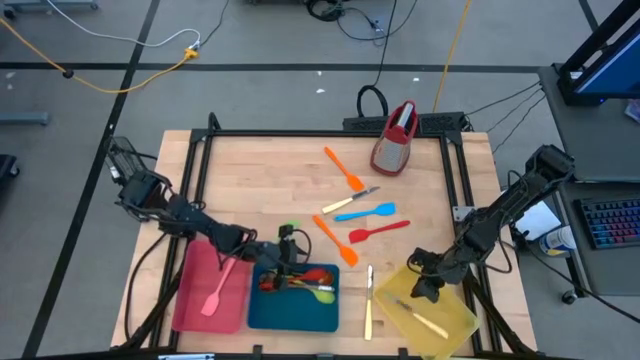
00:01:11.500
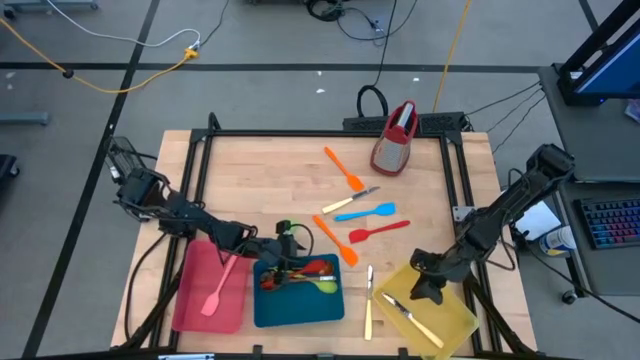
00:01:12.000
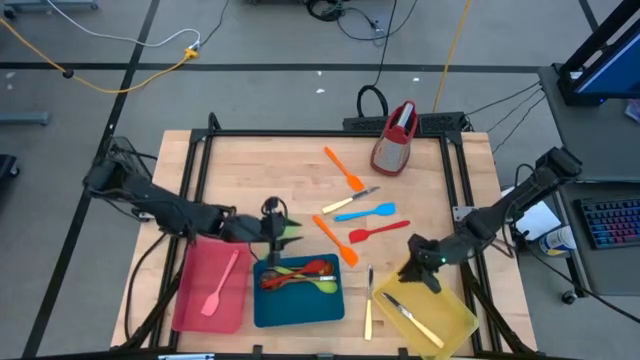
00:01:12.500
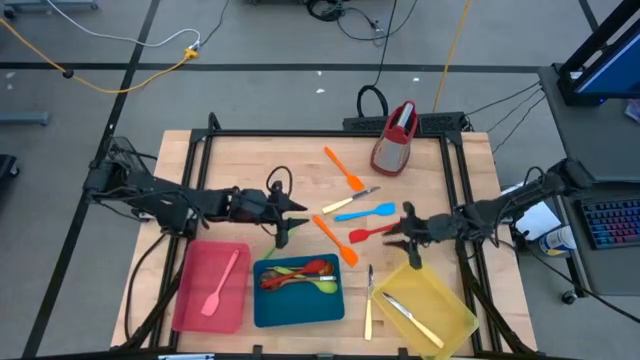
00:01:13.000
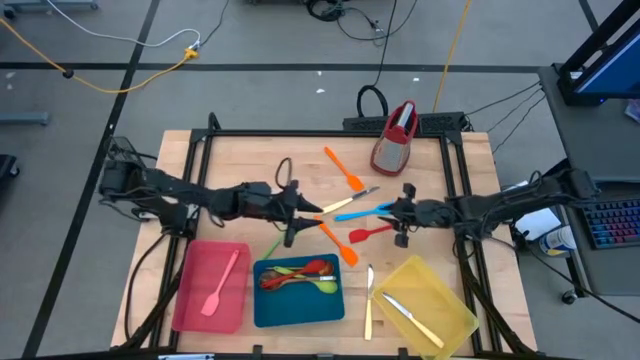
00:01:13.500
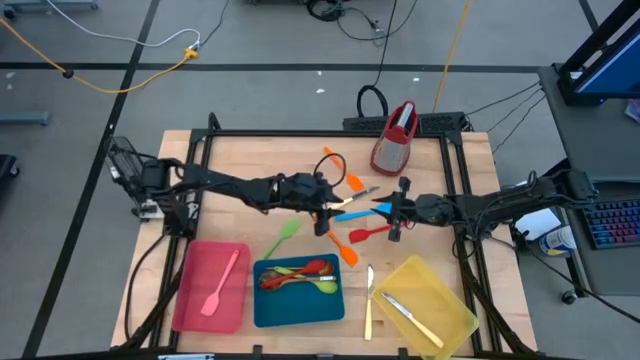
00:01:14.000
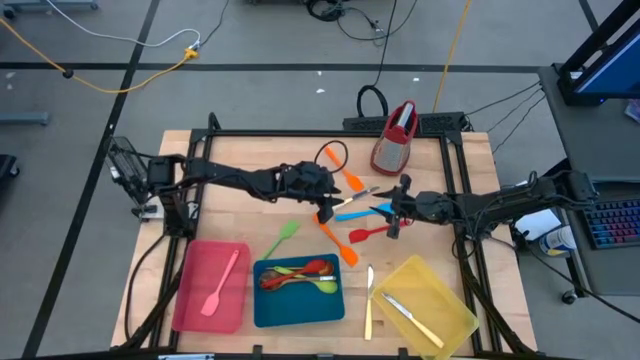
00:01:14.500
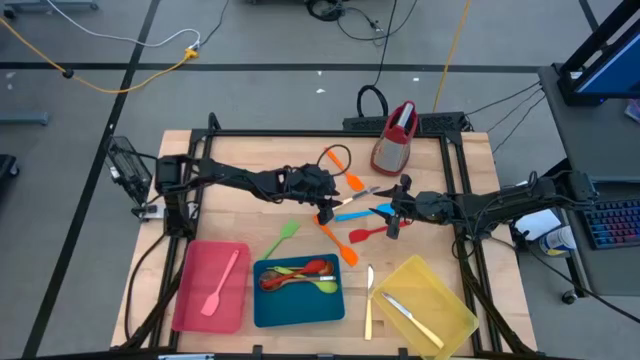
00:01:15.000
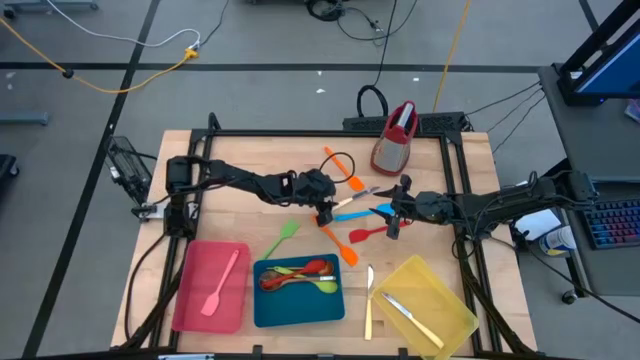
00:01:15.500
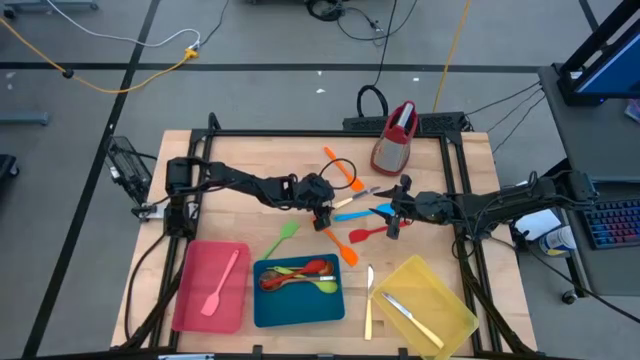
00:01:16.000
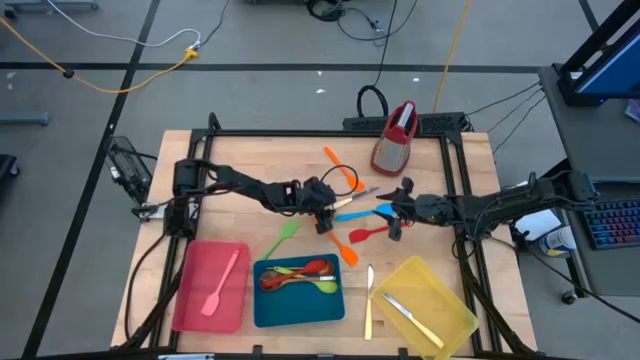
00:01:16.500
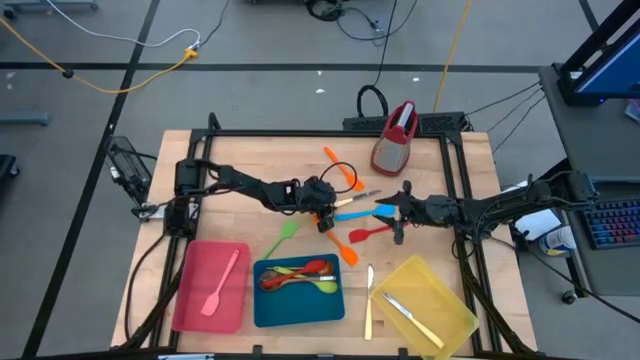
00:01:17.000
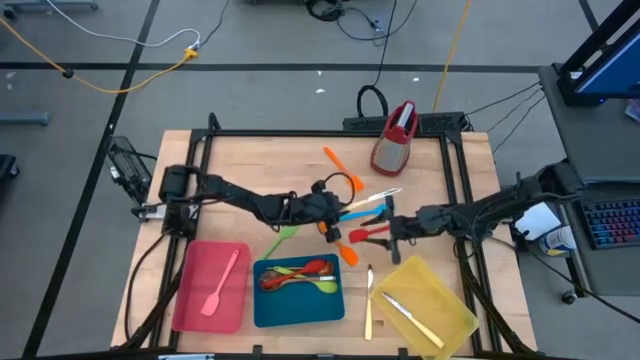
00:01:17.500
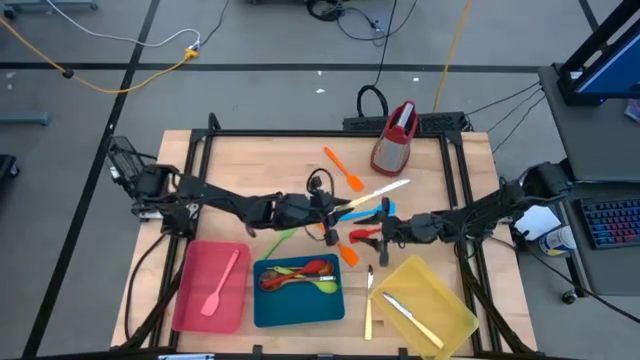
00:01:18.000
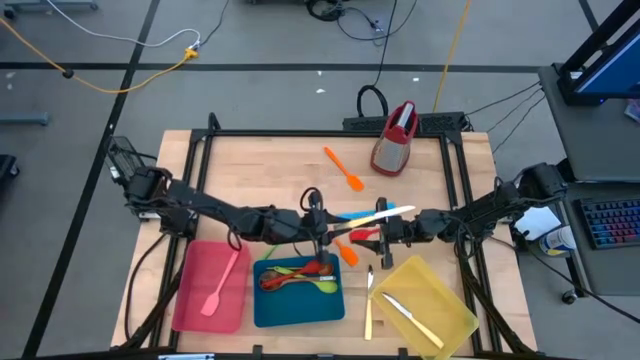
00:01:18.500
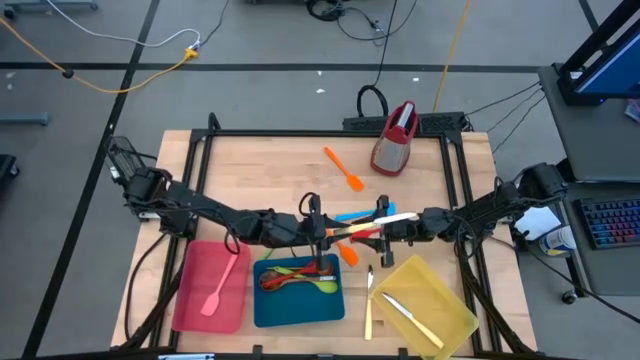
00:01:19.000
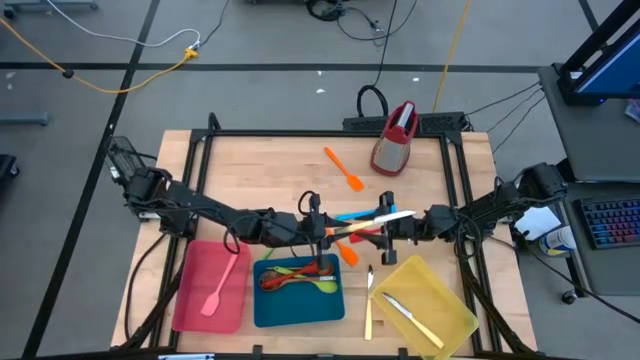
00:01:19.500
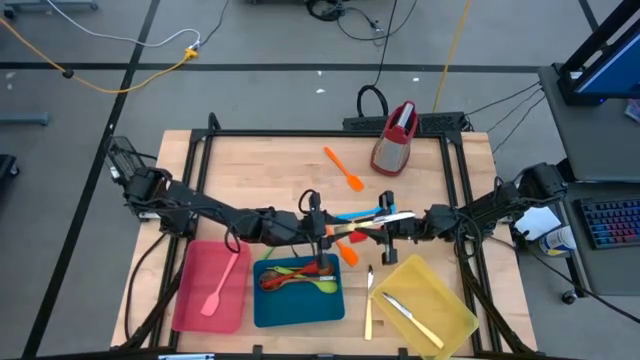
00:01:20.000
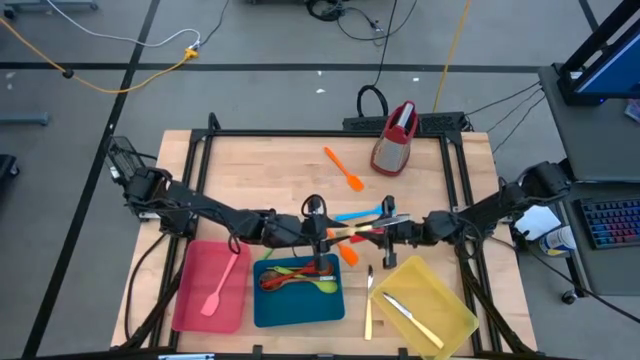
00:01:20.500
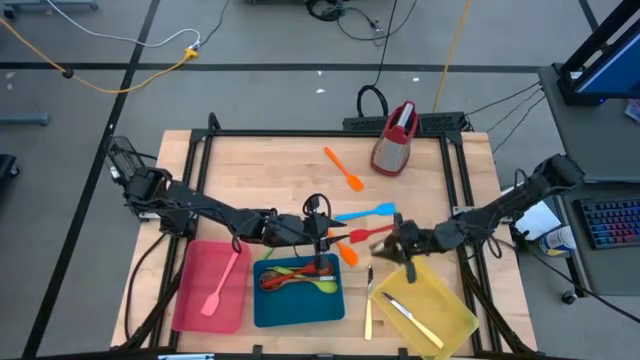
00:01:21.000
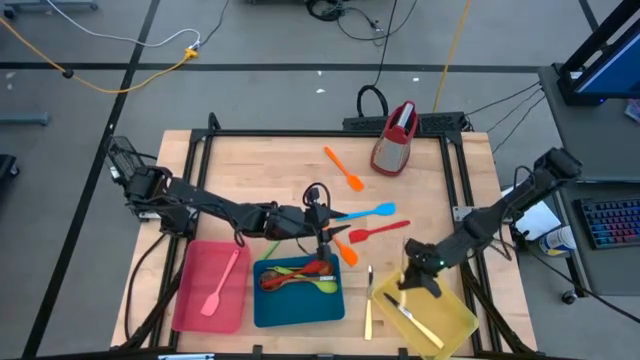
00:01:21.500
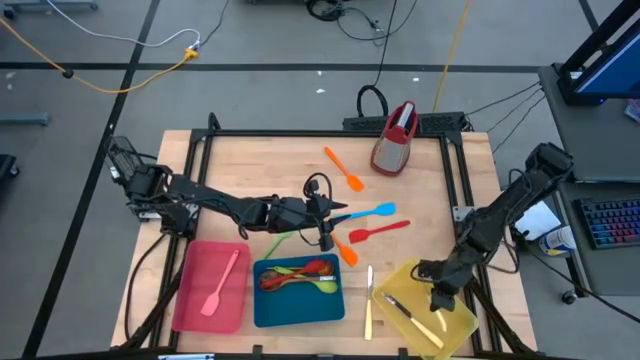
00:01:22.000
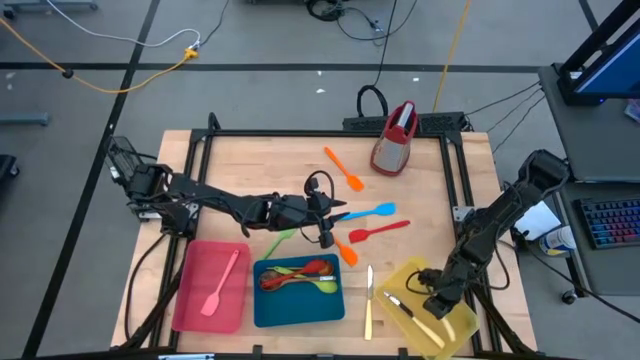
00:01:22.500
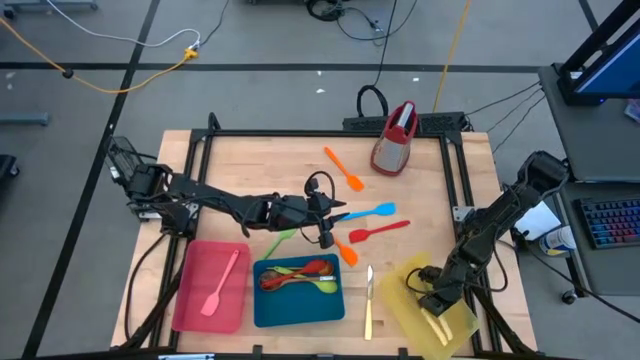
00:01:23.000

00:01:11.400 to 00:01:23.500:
Task: Pick & Place Kitchen Items
Put the yellow table knife into the yellow bin

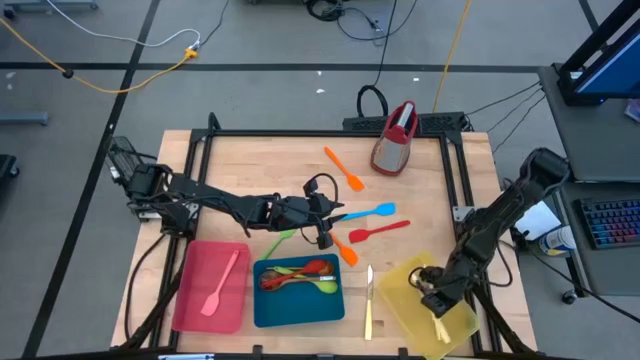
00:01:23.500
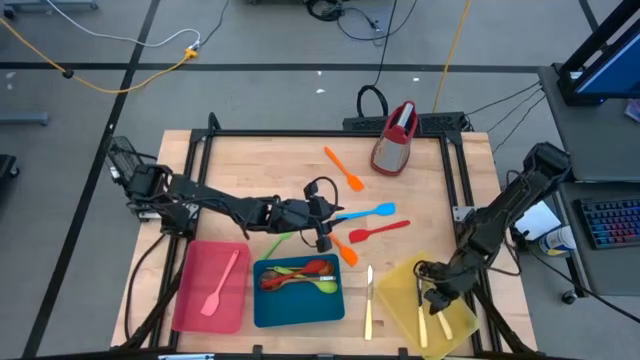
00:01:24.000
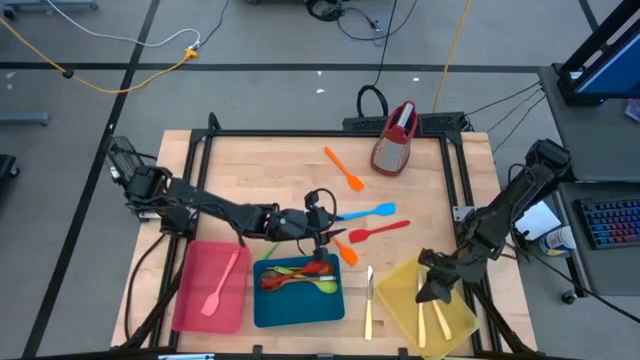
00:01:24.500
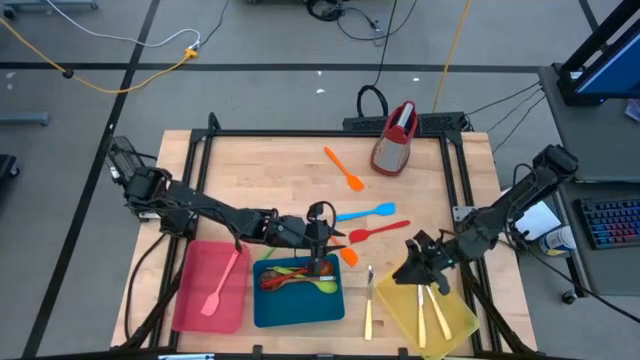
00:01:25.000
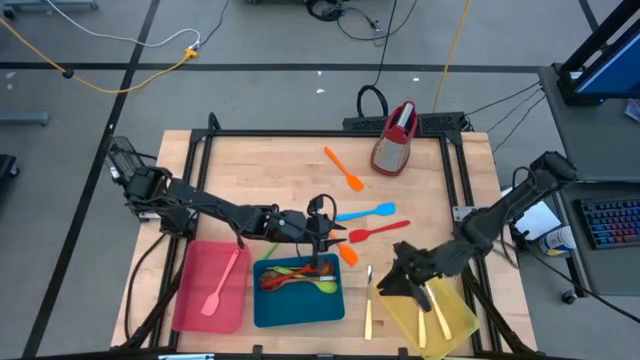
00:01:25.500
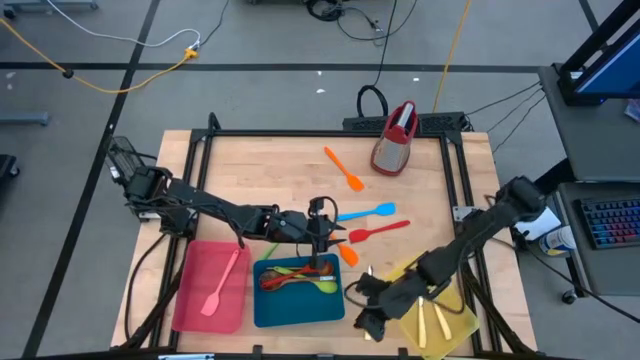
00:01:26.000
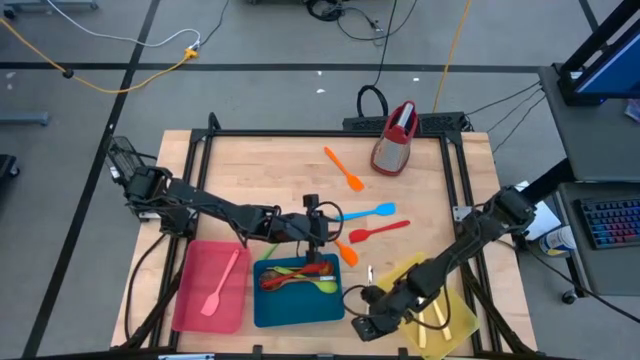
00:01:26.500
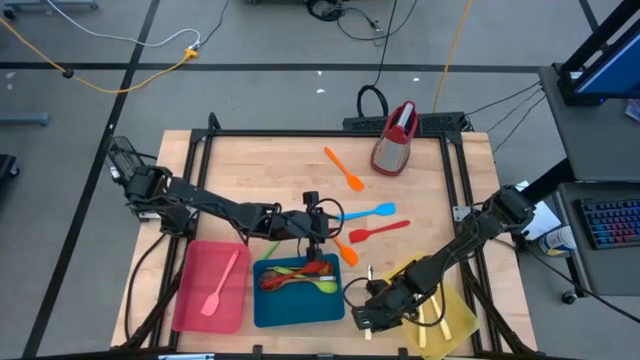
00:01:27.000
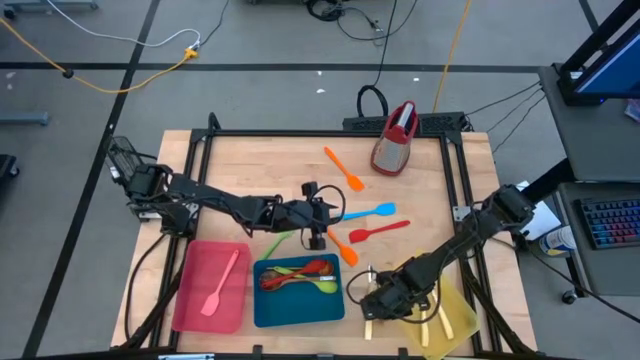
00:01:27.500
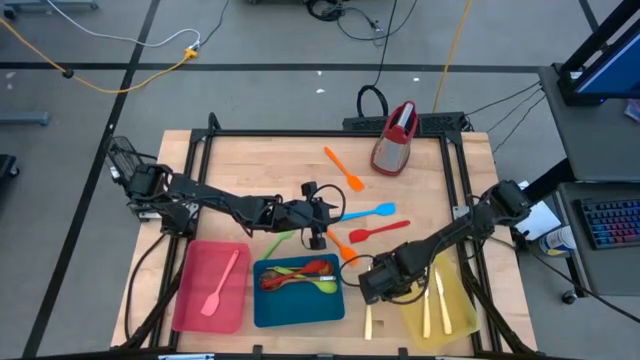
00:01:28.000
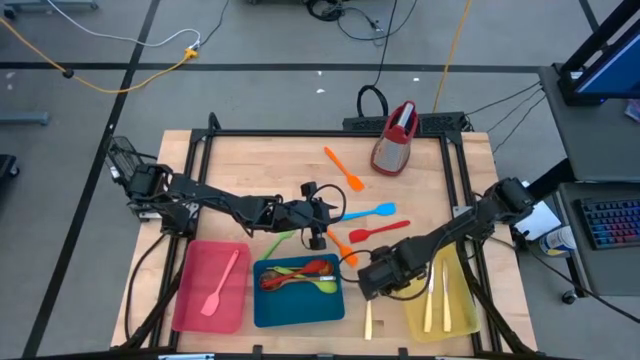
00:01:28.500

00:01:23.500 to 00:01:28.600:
Adjust the yellow bin

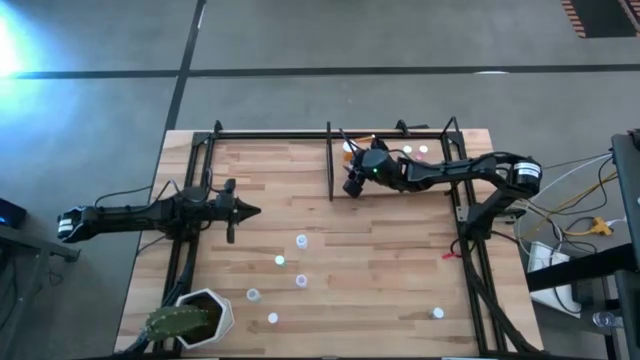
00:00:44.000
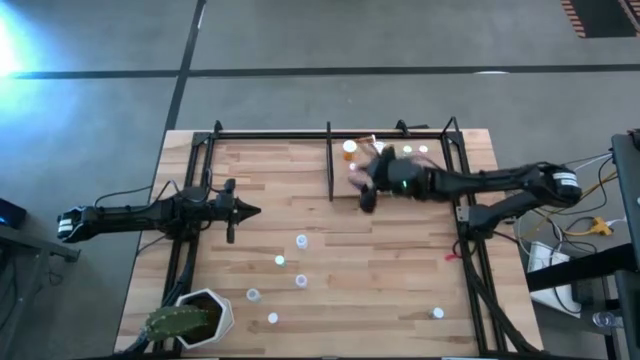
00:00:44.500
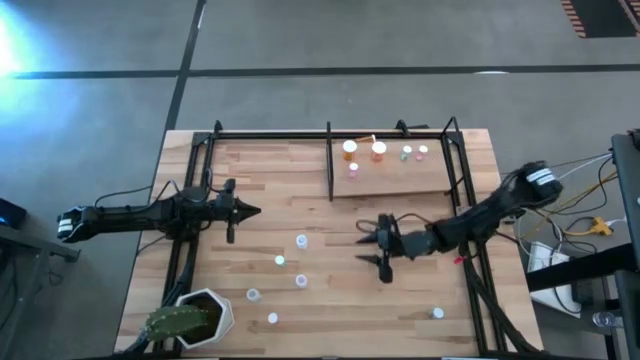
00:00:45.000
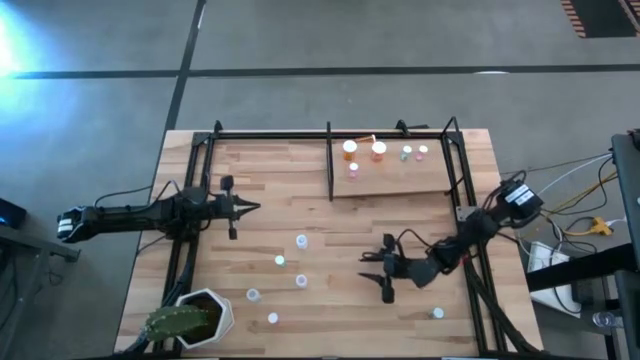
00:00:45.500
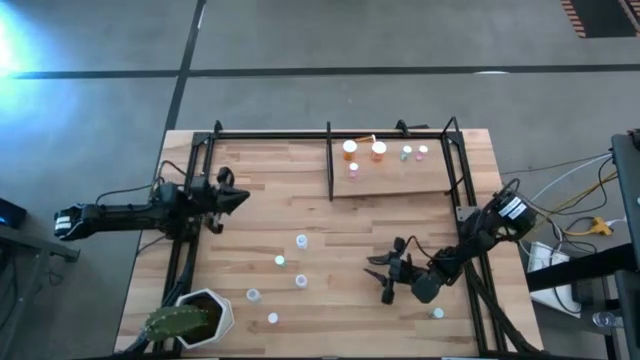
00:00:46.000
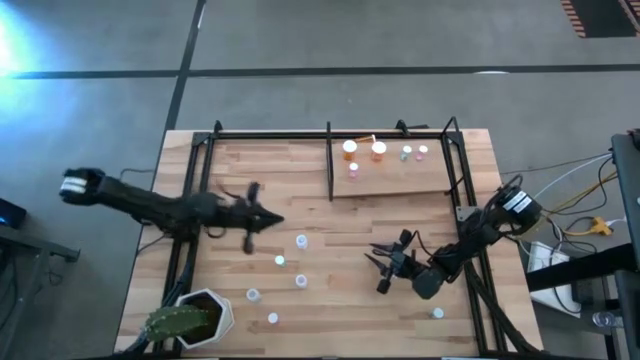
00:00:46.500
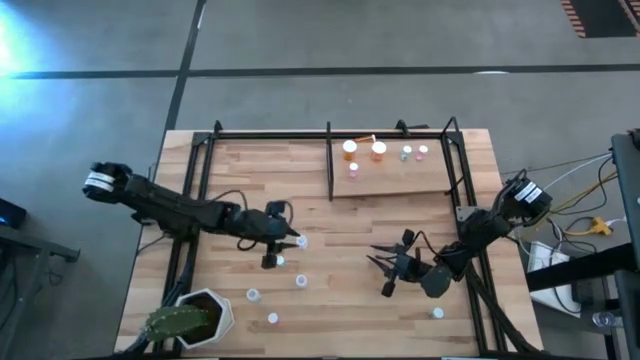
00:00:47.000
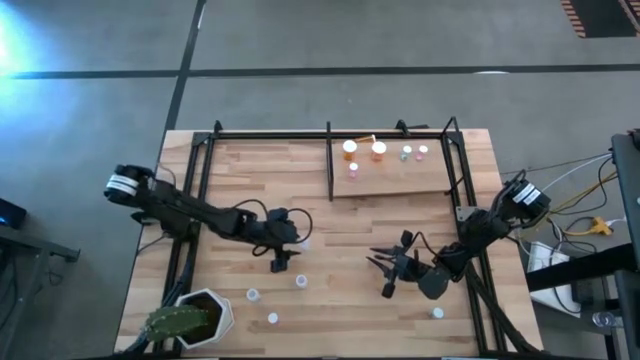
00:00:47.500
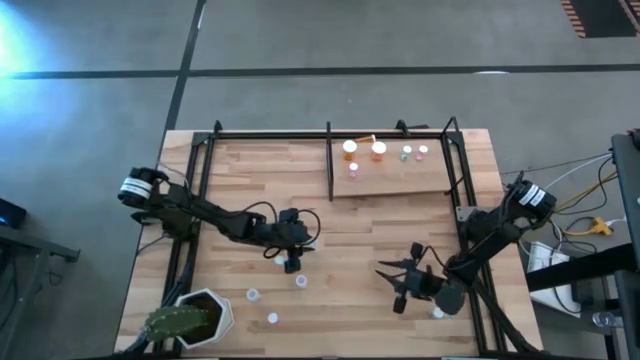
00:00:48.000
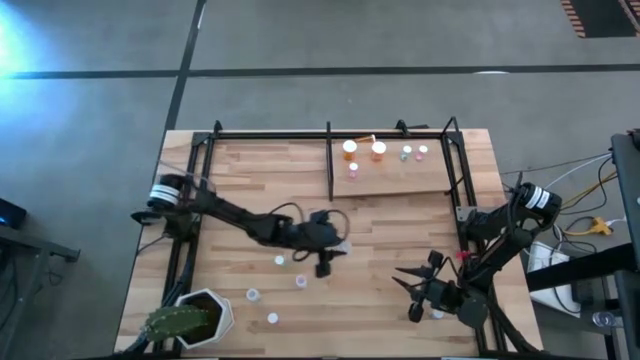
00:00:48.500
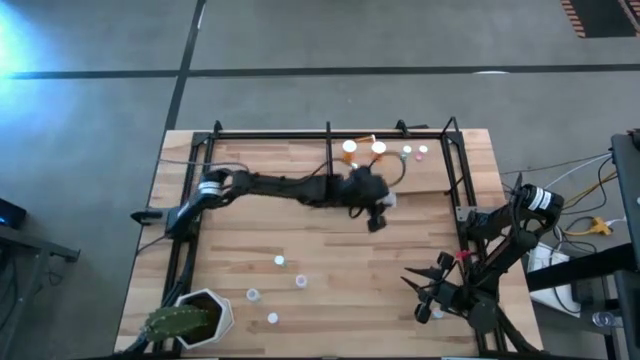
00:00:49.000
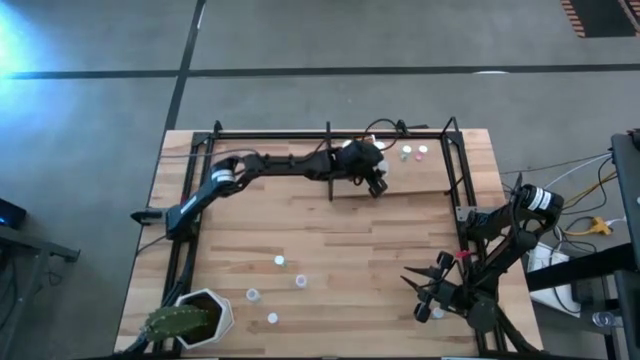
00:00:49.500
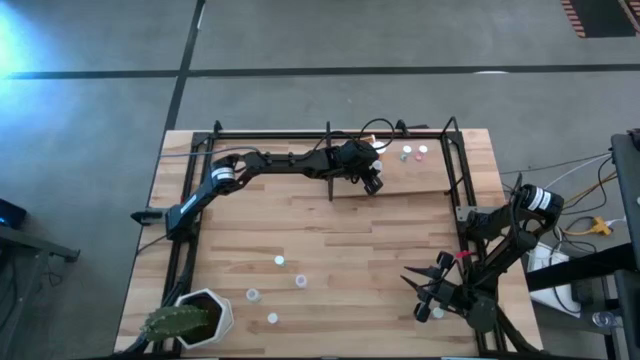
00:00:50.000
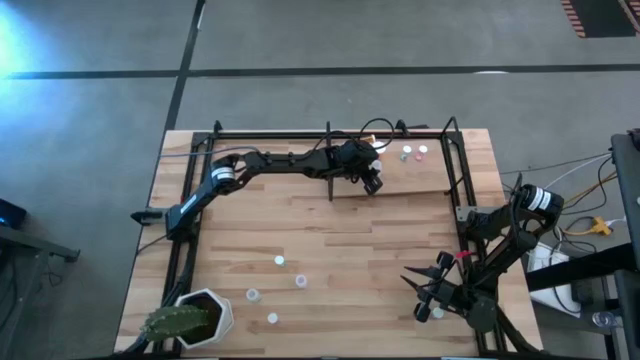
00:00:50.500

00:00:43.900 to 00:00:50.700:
Task: Pick and place medicine bottles onto shelf by color
Put the top transparent pill bottle on the shelf
